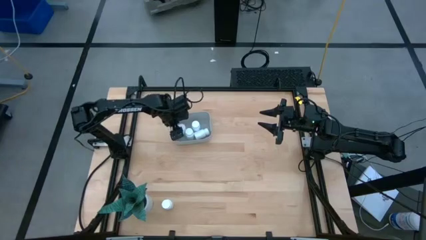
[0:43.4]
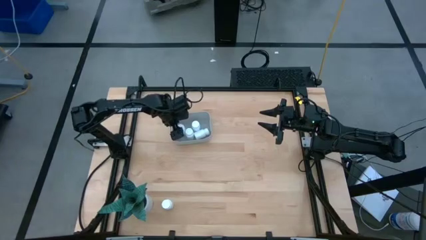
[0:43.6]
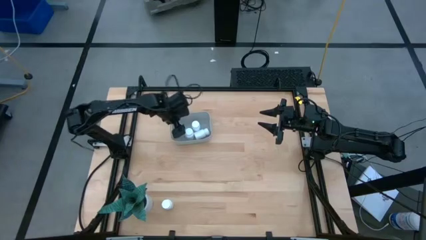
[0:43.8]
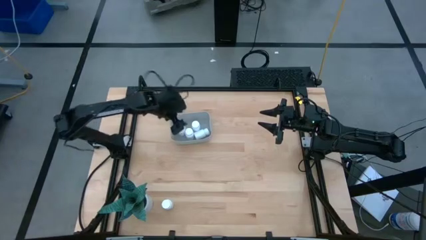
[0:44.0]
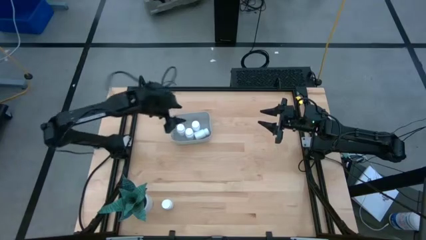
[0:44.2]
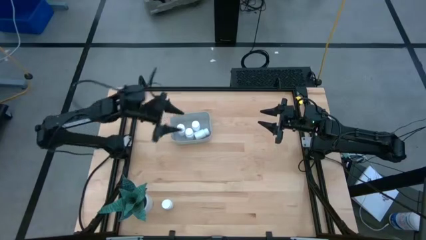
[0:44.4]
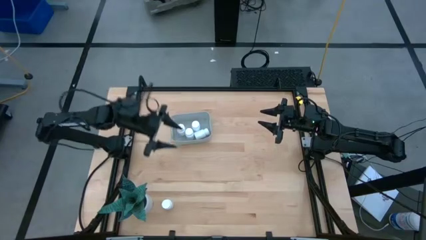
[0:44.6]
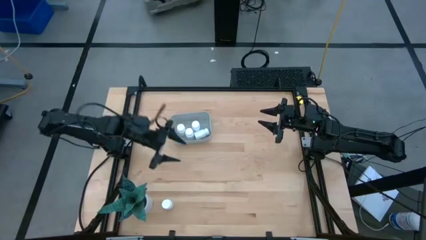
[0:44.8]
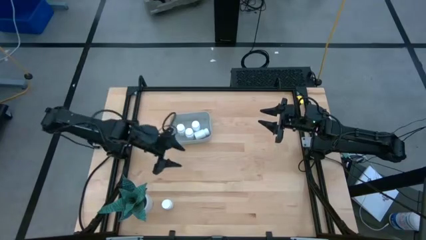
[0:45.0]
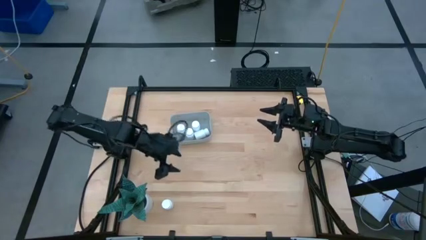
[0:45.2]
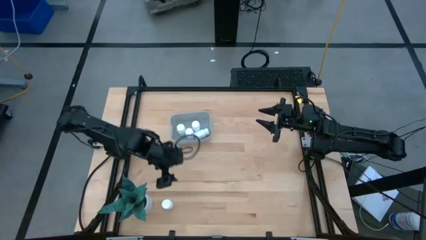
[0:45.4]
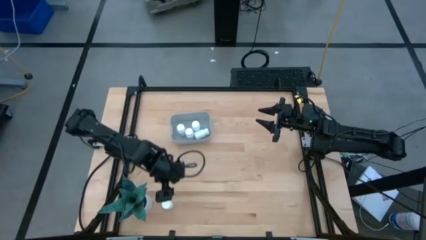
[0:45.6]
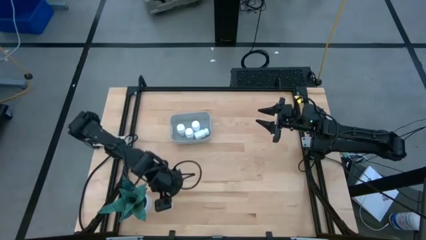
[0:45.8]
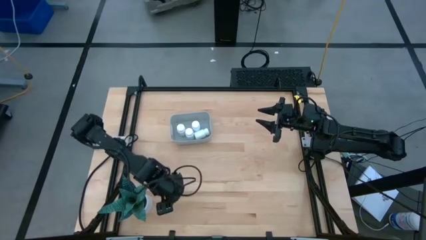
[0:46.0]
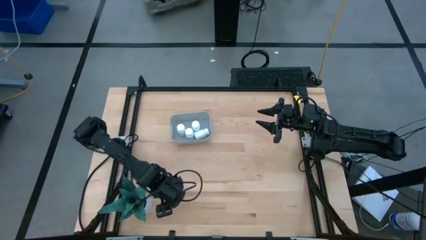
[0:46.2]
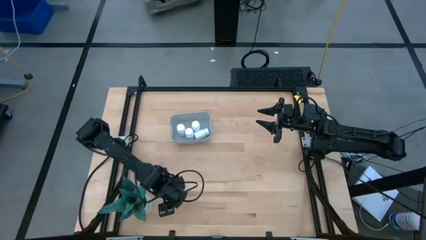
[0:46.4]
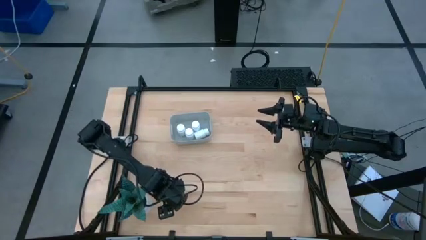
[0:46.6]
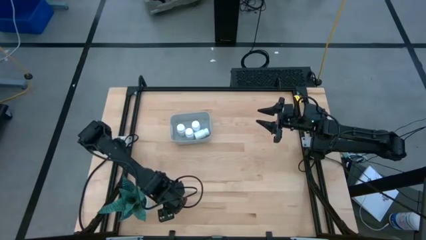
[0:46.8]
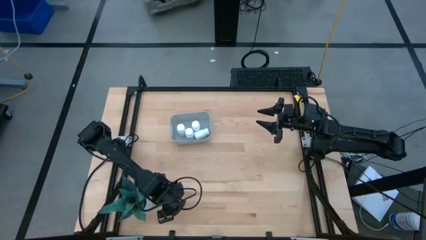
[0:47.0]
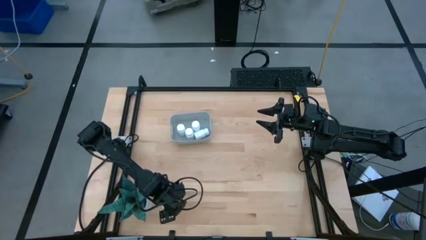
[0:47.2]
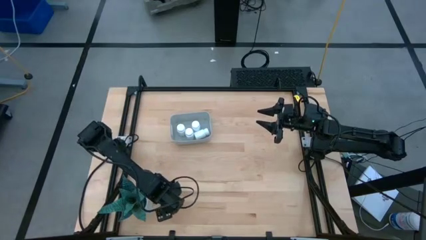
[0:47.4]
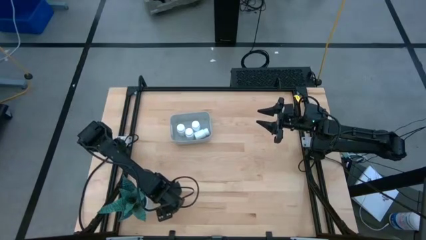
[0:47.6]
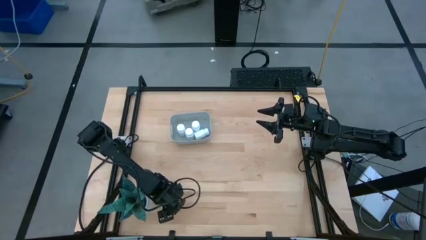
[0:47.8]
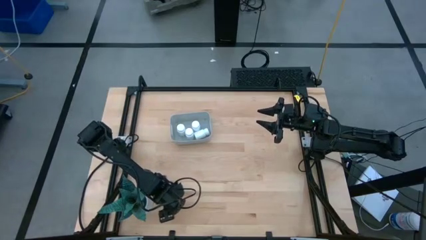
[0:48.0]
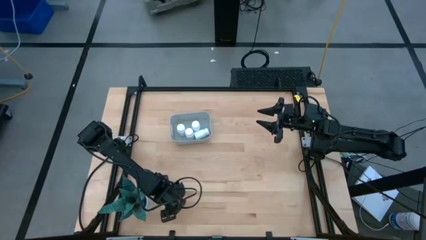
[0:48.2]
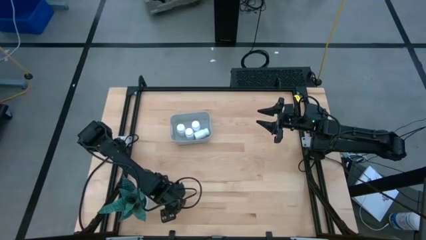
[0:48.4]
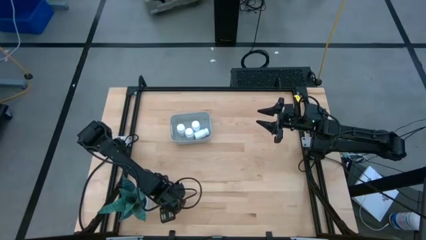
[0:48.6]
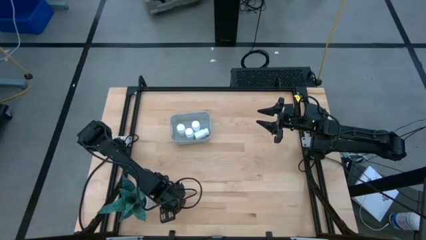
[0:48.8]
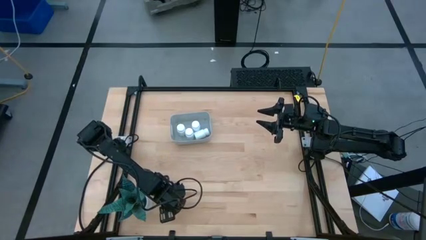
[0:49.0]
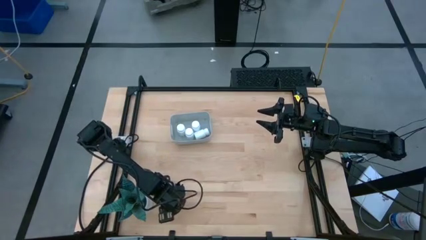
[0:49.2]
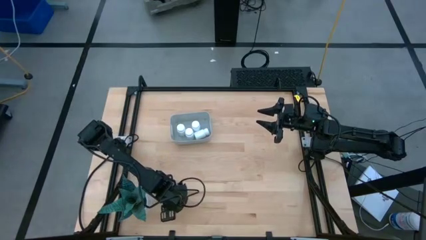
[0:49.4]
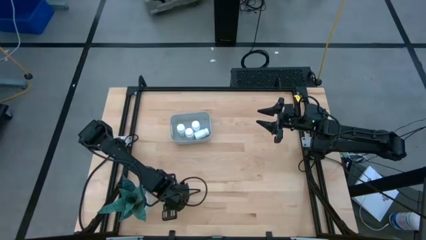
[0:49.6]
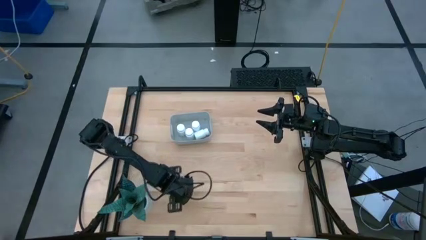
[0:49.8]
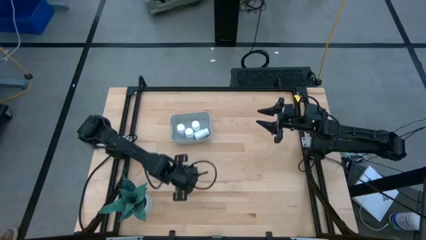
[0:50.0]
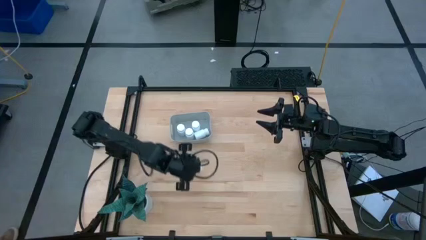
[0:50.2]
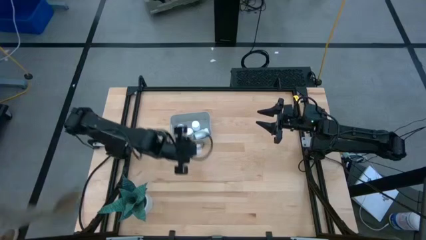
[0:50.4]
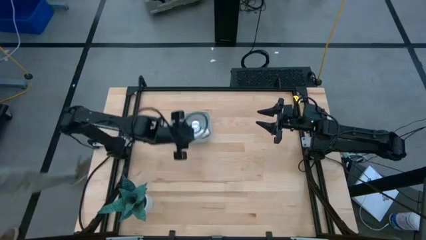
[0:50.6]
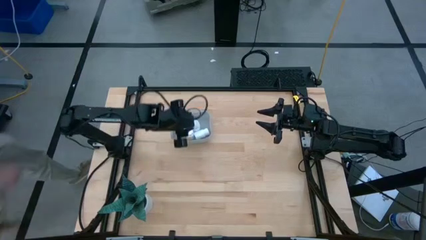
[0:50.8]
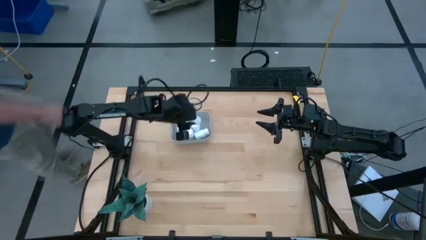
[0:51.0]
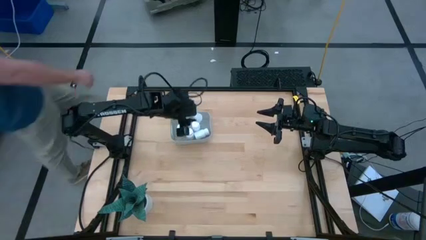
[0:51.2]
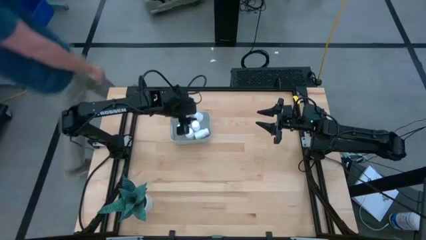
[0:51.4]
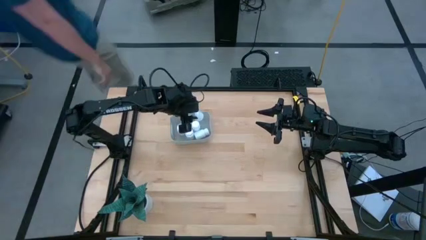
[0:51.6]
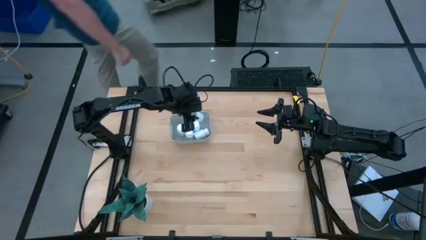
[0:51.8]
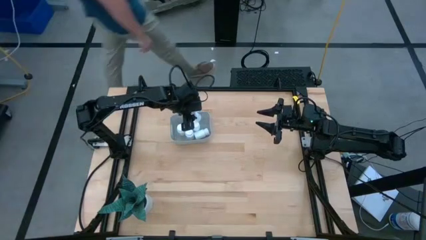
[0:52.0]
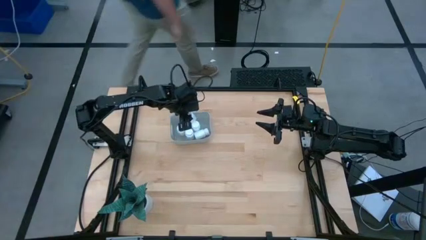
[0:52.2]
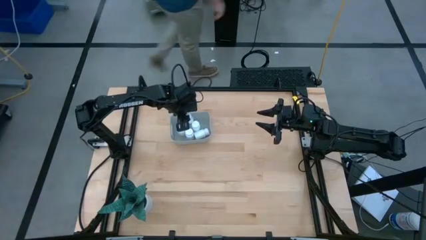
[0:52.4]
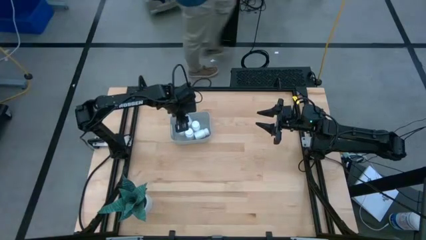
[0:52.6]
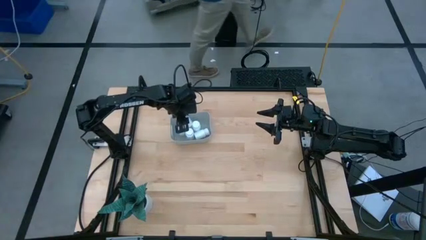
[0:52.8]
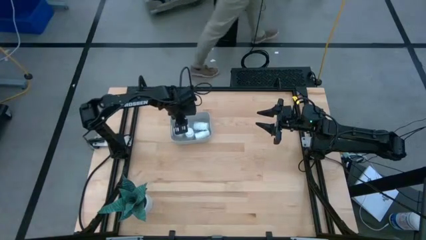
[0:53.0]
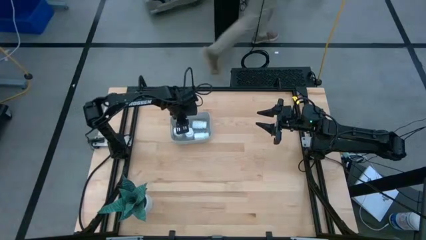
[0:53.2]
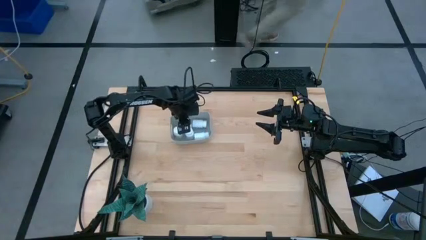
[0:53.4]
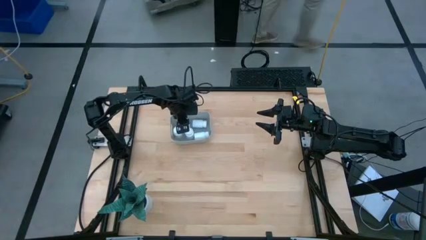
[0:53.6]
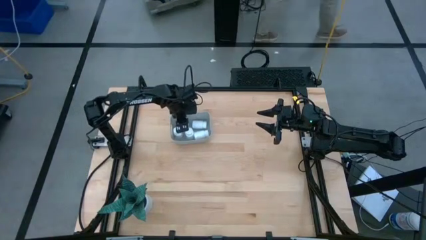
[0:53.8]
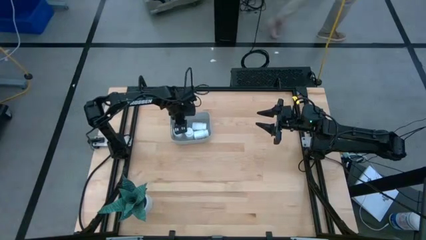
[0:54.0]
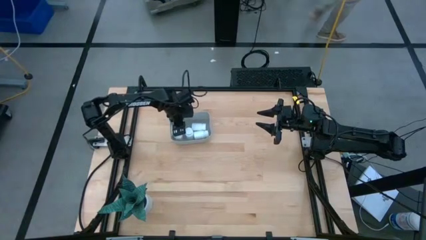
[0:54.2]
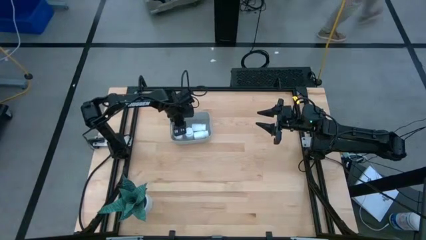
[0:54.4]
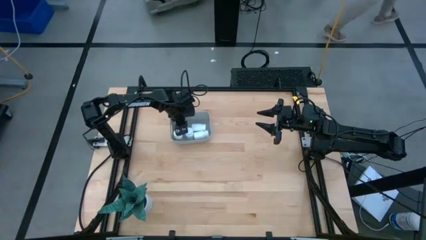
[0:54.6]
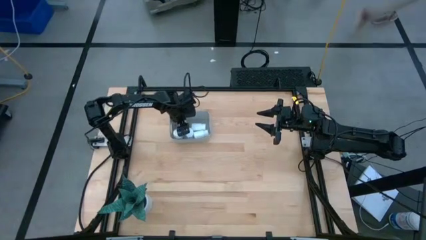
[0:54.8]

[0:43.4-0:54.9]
Task: Pick and place pill bottles into a basket
Put the white pill bottle in the gray bin

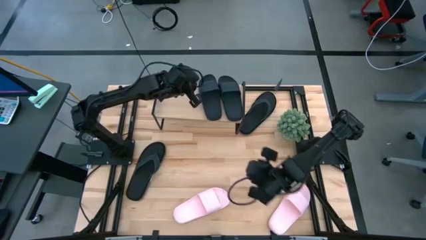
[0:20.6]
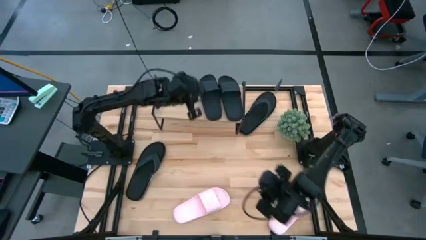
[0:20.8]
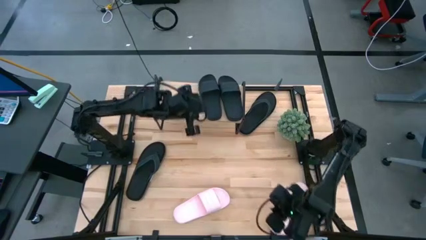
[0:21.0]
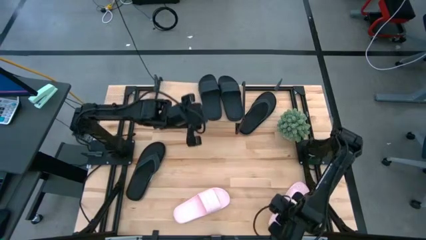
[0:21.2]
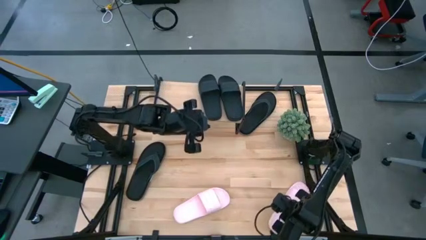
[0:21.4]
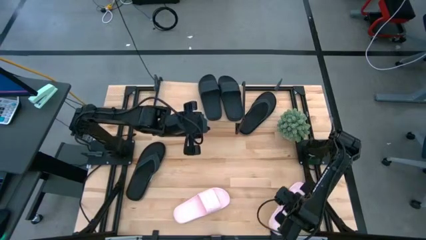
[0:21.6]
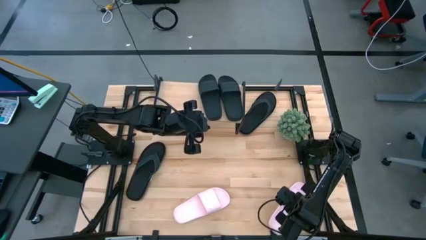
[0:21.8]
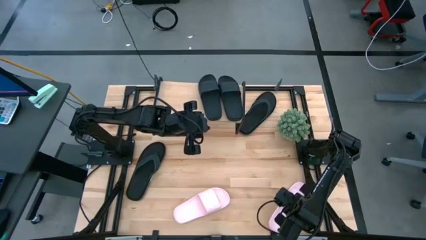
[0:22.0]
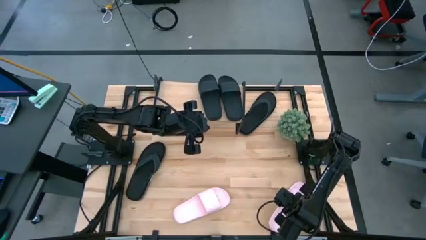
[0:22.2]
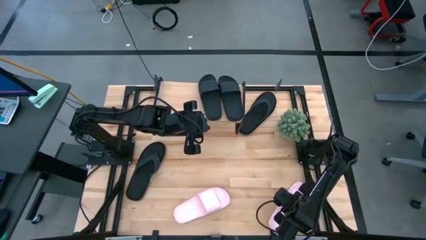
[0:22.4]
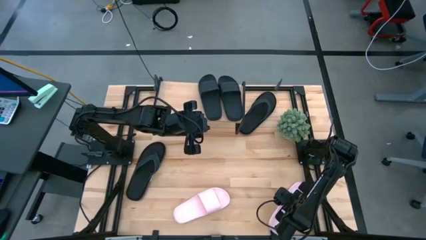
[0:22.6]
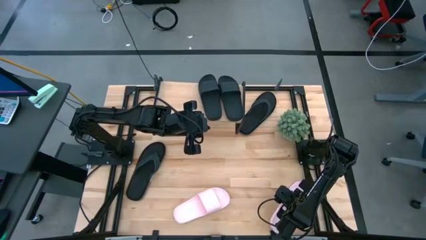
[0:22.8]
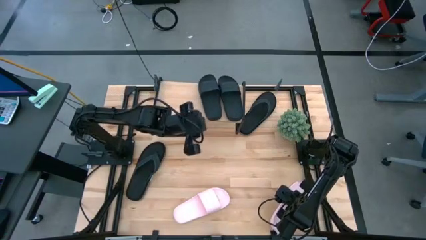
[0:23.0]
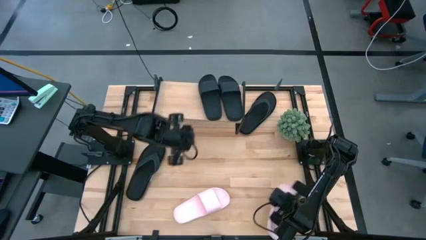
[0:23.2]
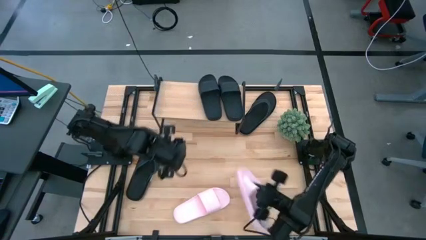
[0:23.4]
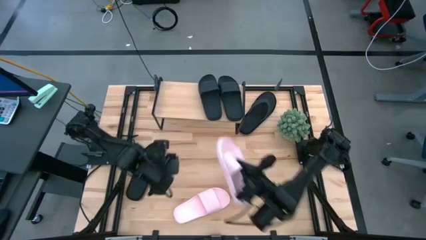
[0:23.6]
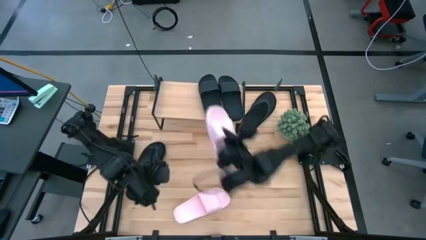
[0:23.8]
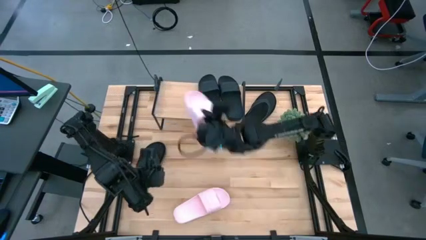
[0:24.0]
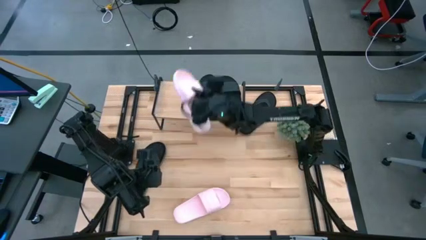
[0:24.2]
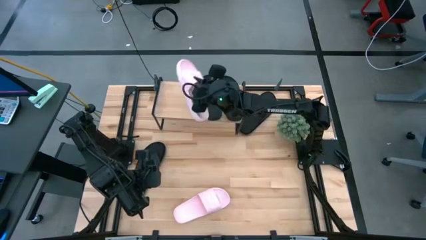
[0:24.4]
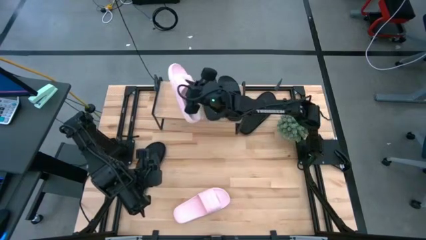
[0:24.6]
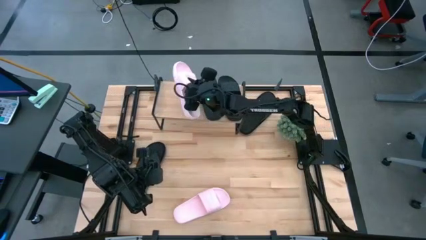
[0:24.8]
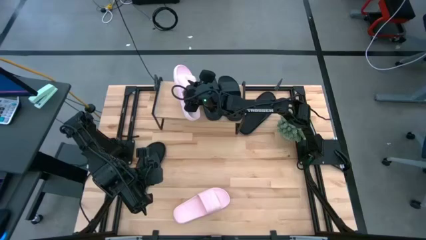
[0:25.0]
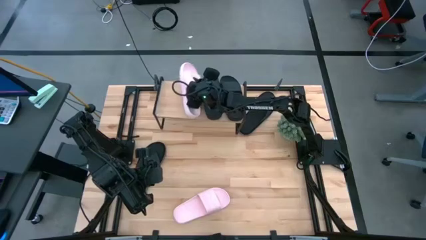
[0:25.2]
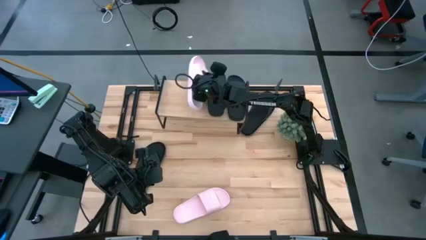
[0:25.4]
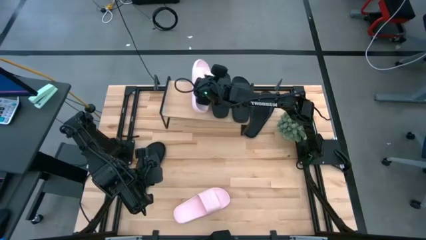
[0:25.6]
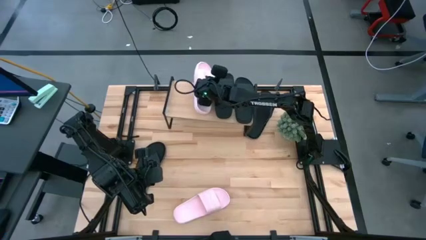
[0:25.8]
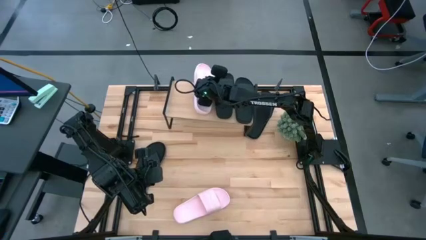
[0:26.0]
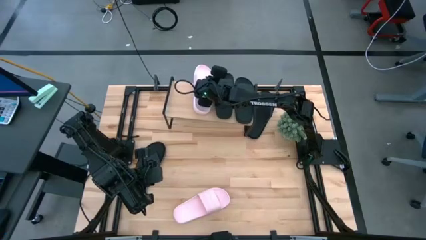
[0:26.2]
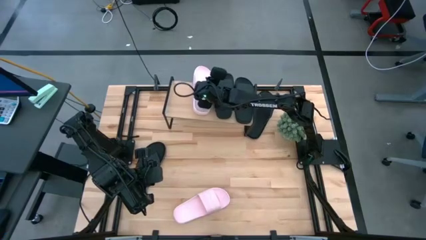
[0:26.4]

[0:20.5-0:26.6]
Task: Pick and place slides into the shelf
Put the bottom right pink slide on the shelf
